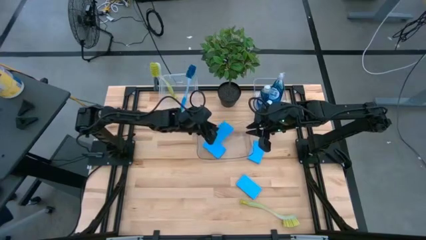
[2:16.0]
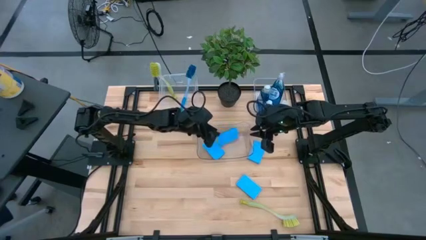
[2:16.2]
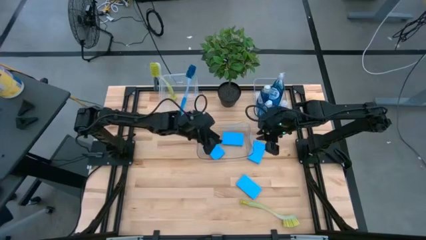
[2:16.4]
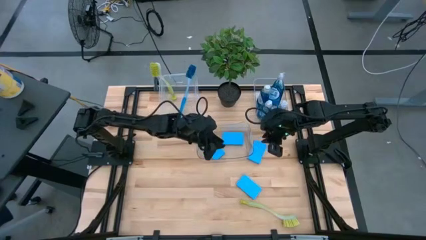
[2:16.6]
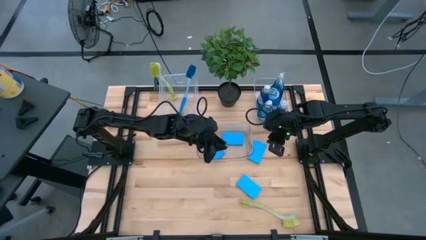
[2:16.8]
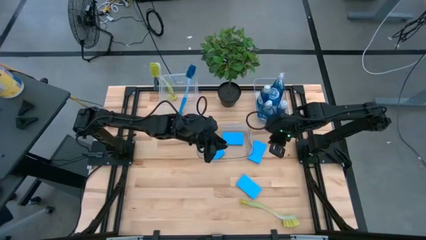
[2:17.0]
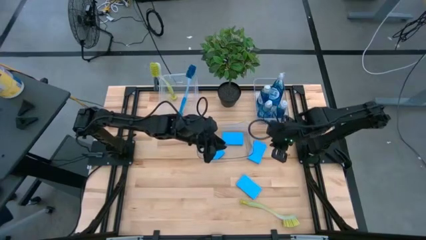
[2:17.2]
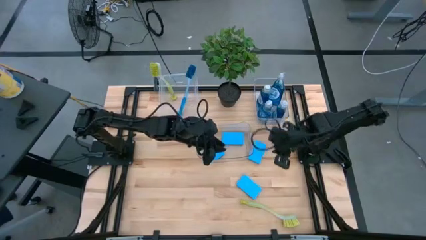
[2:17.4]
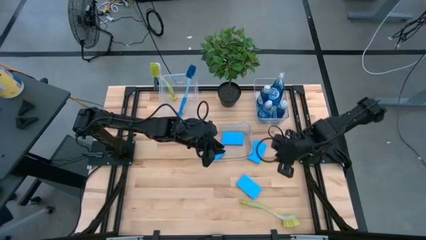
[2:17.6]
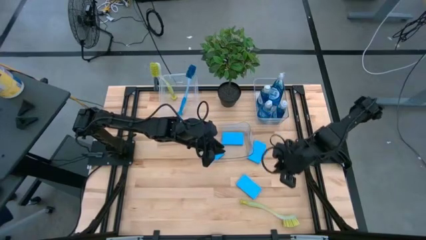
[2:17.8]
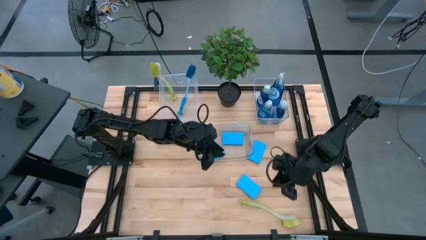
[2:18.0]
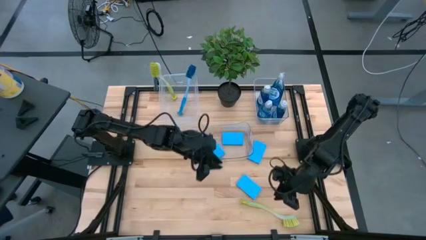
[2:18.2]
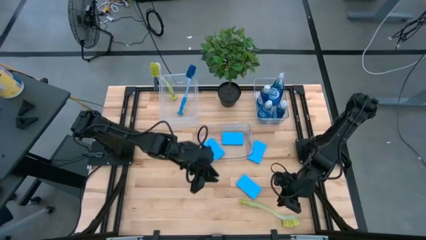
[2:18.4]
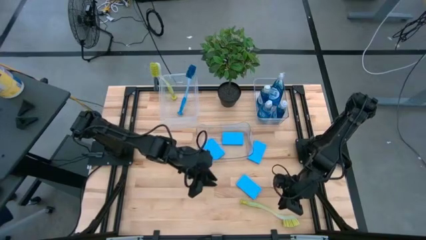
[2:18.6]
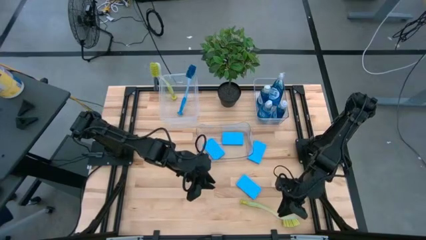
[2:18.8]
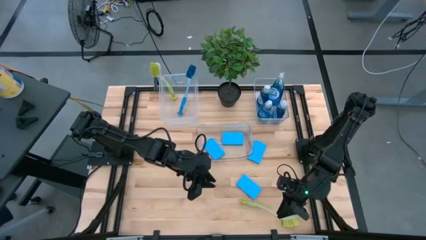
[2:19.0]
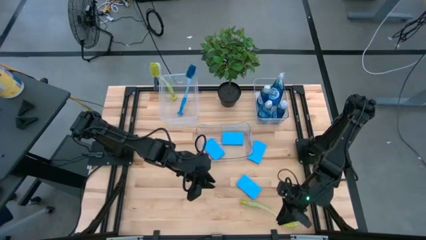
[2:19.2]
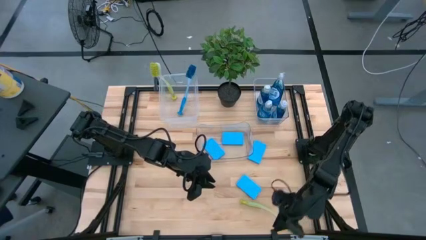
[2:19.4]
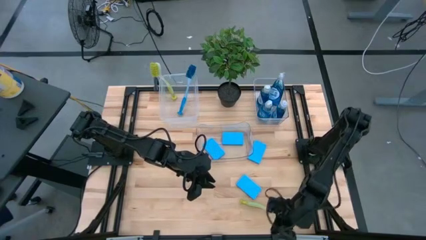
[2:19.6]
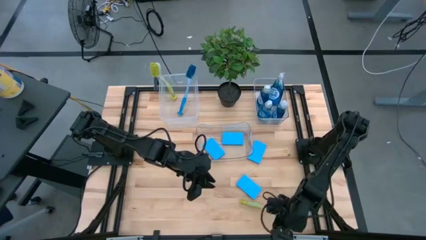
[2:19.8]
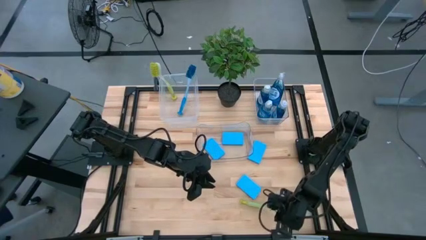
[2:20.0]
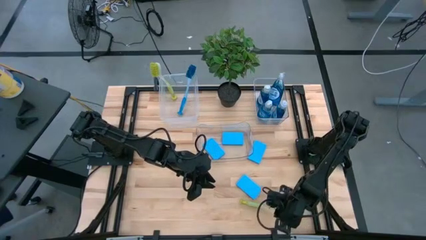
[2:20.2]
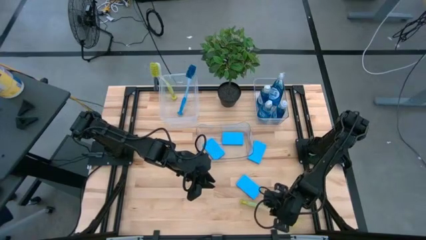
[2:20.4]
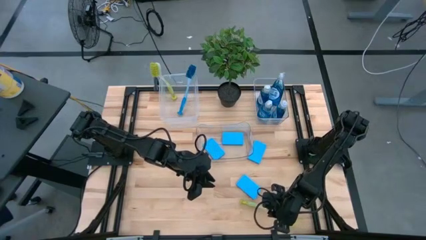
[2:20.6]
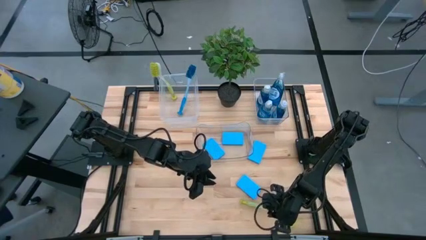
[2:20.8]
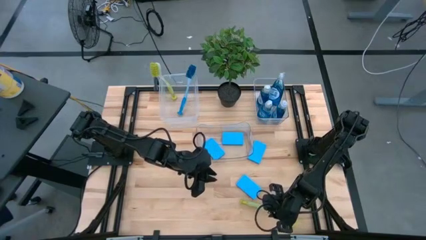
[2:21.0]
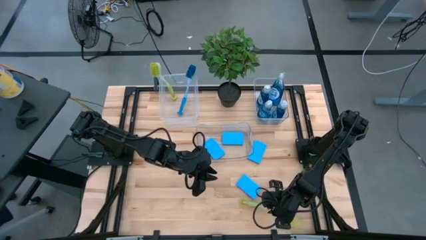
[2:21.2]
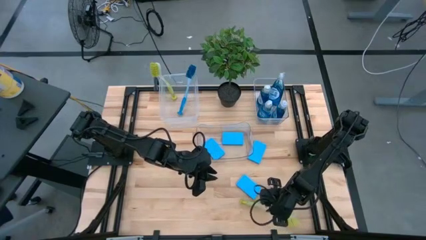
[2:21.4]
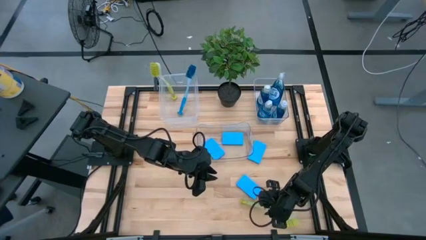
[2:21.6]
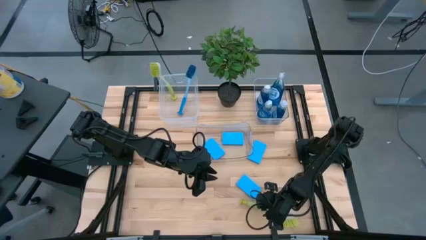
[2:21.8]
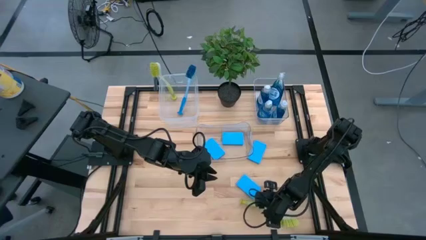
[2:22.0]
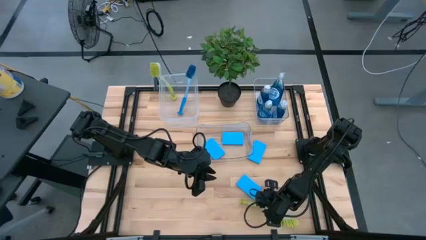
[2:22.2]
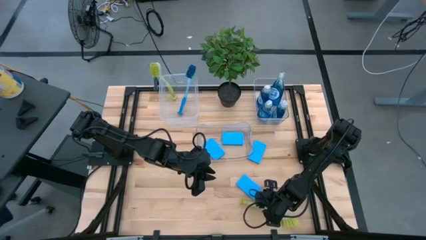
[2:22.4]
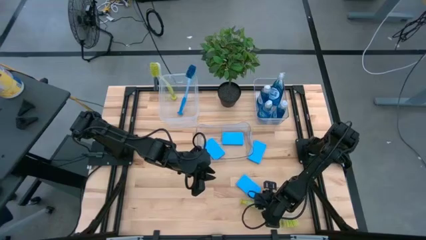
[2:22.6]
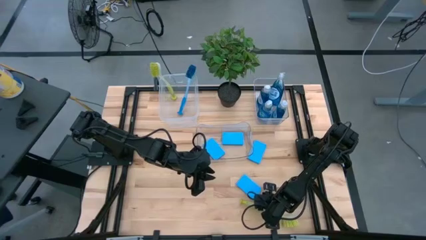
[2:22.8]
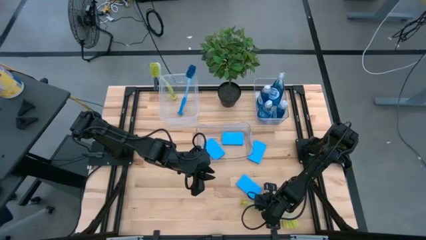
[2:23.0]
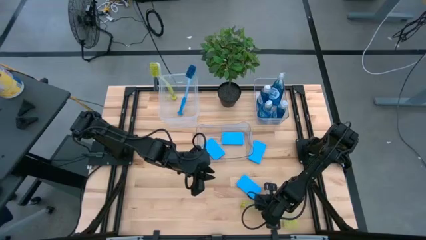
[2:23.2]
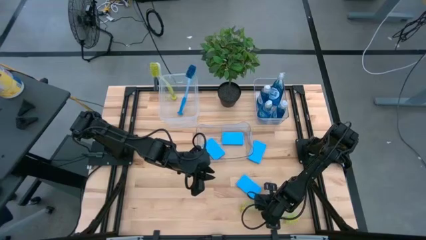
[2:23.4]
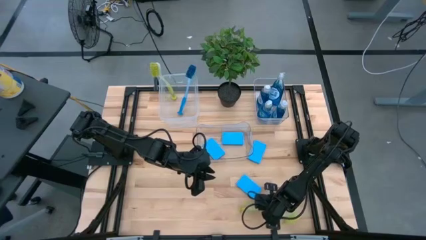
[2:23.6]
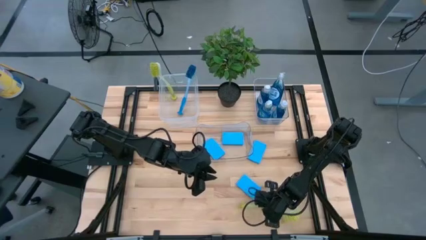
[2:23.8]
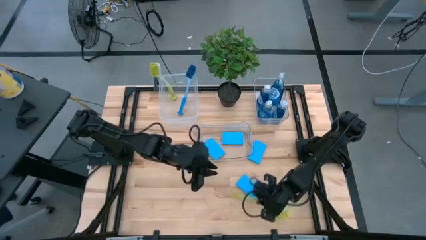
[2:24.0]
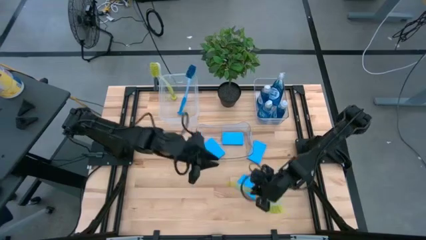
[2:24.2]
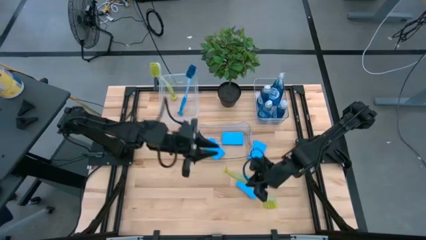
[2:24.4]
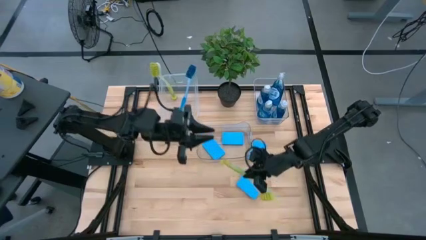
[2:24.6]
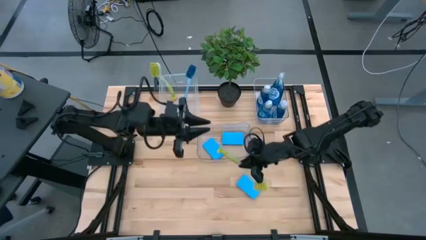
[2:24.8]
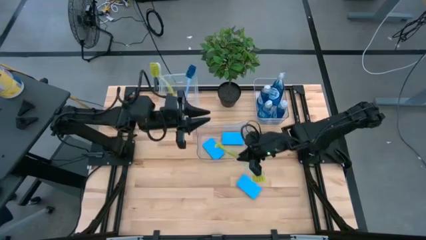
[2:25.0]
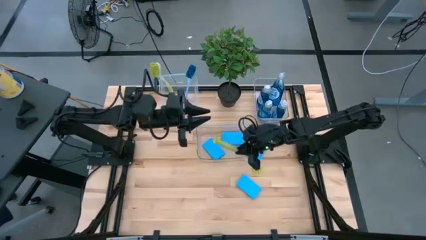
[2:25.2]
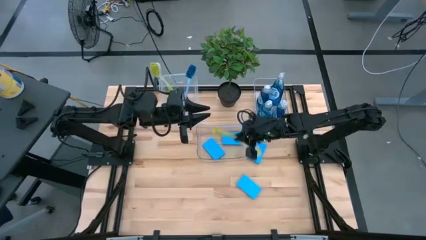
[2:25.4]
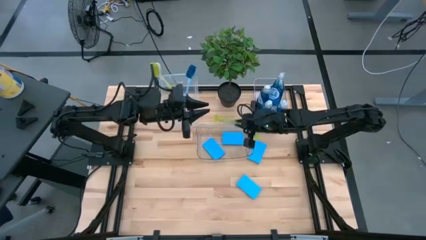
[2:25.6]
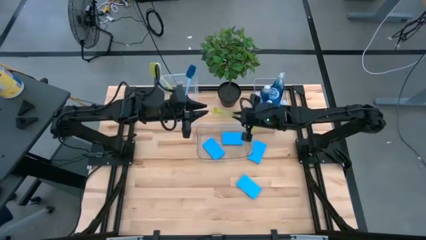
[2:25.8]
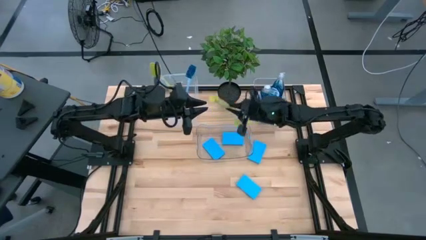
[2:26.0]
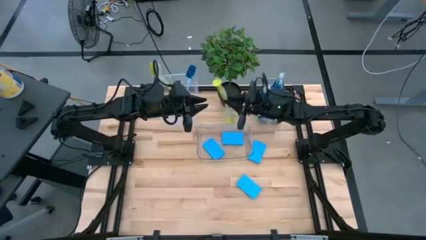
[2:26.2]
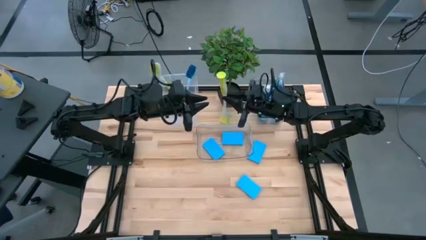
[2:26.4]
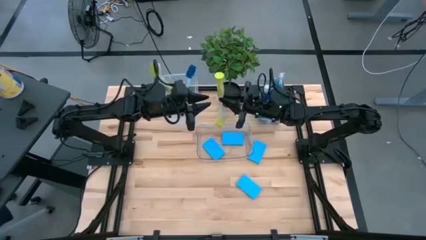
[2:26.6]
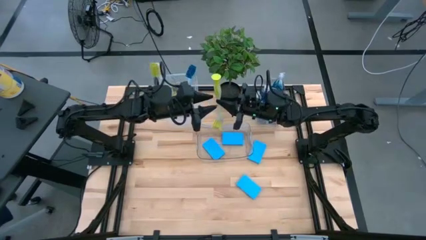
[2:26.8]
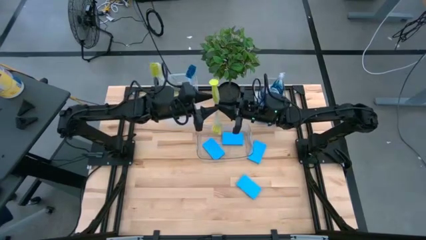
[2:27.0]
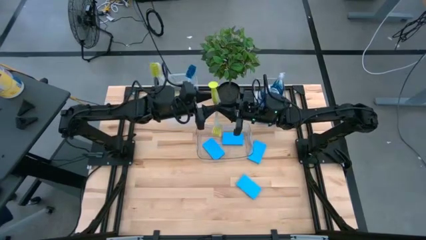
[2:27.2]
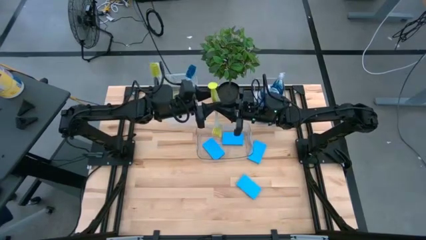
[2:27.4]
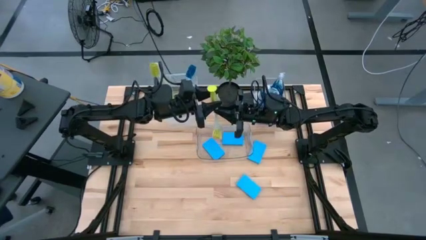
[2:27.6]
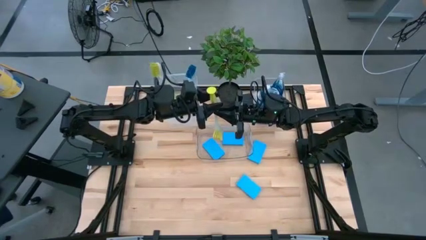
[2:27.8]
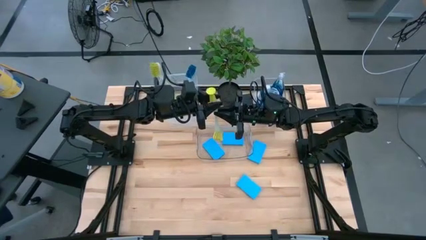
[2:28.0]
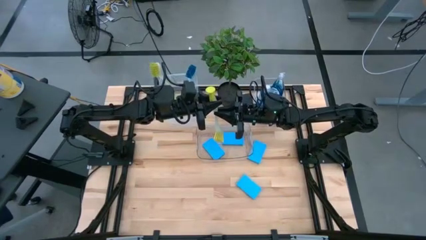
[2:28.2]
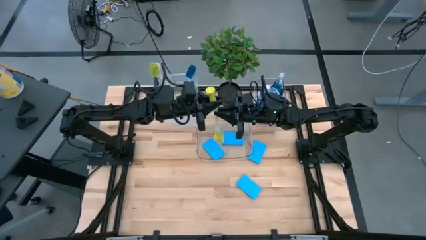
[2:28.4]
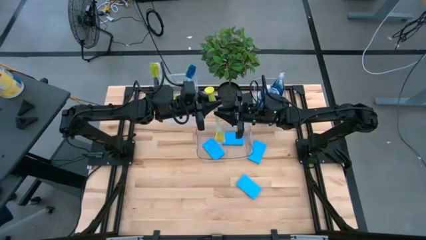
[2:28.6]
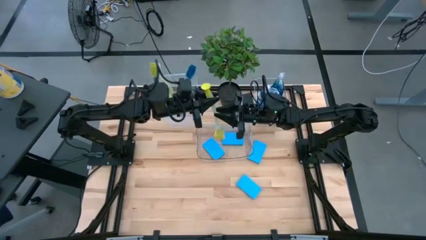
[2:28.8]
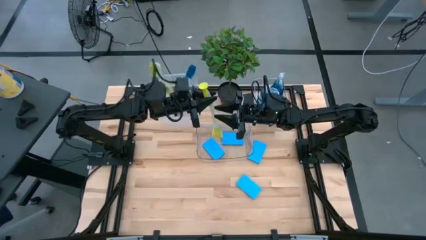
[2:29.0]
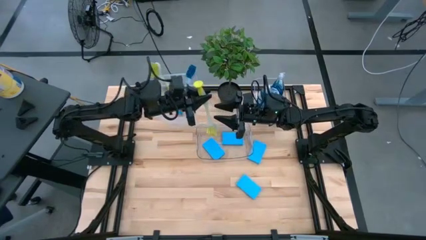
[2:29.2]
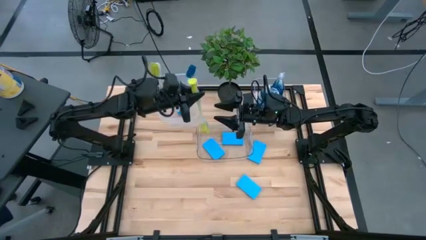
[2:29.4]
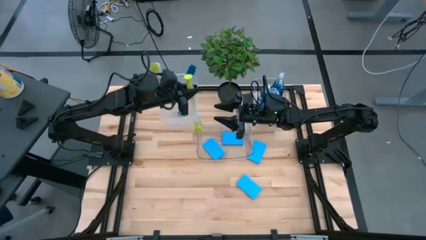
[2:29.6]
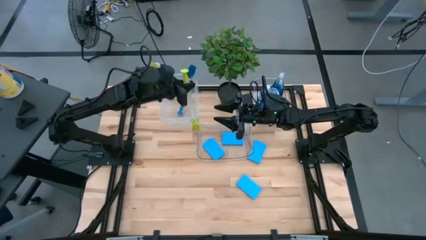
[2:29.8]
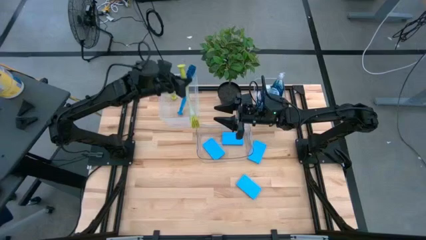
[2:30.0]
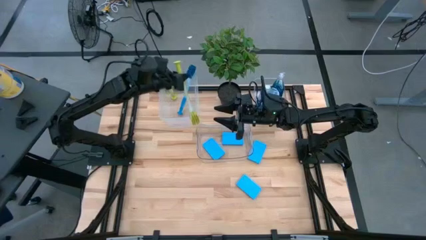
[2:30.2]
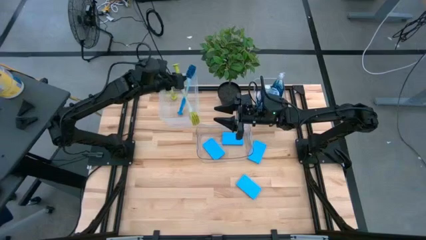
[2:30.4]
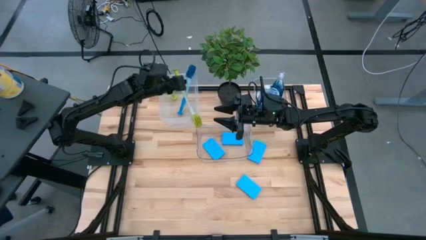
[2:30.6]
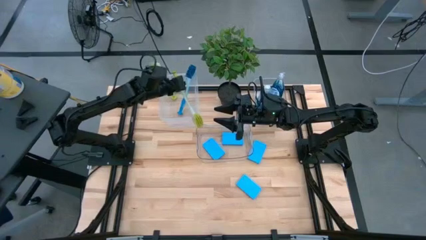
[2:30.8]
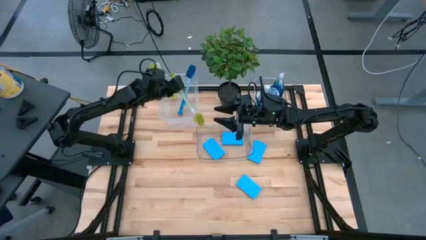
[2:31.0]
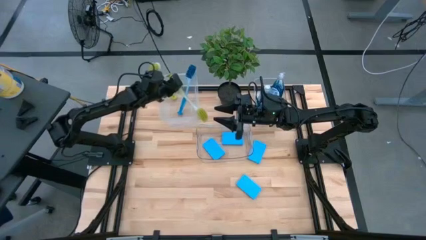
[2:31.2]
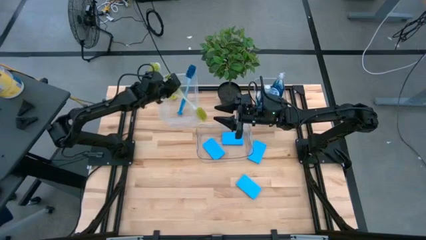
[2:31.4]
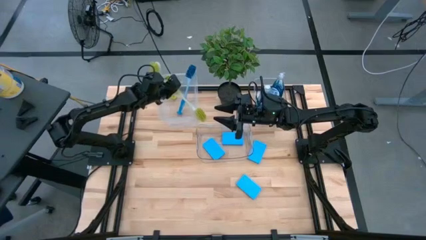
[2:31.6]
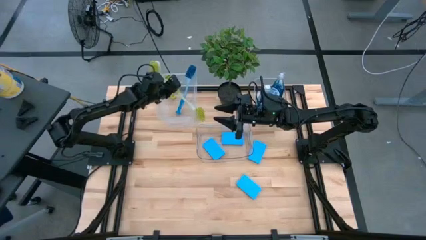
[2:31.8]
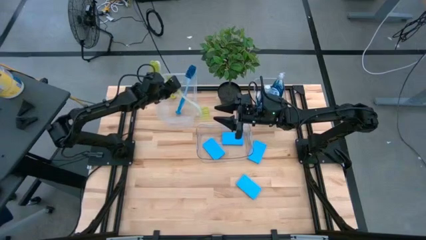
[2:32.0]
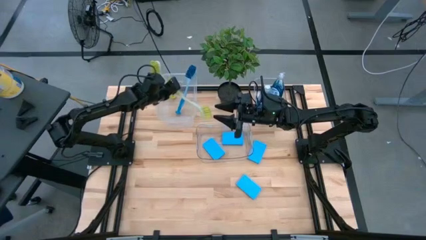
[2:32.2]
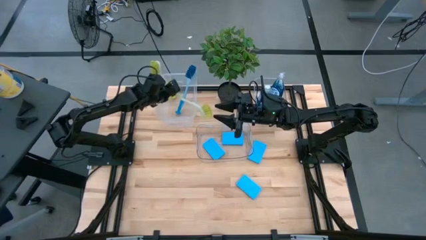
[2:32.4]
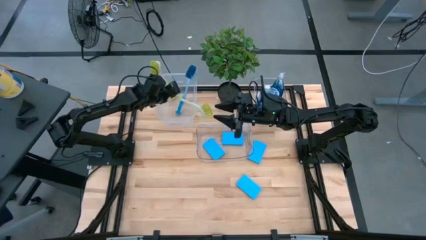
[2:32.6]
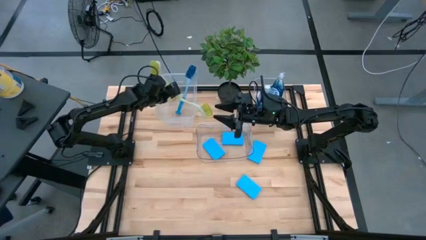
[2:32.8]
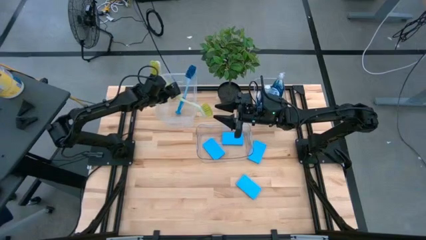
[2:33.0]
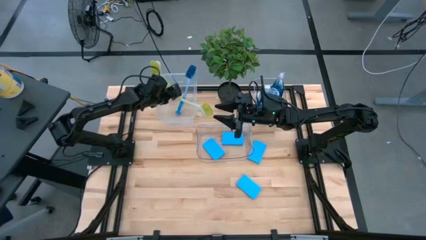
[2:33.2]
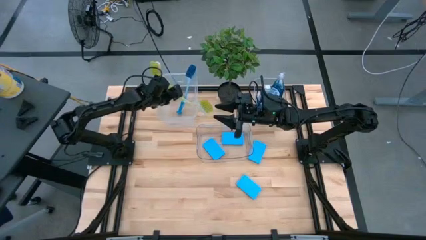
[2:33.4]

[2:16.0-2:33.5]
Task: Pick & Place Kitchen Sink Supplies
Put the green dishwashing brush into the white bin
